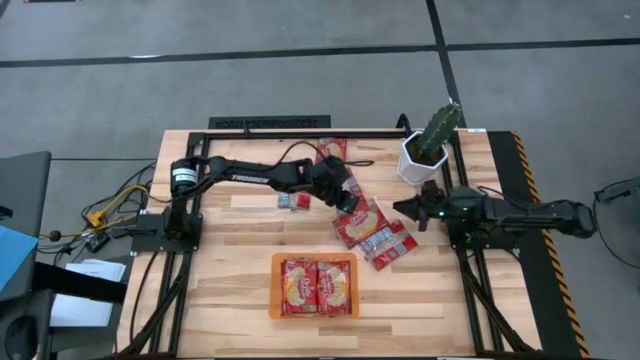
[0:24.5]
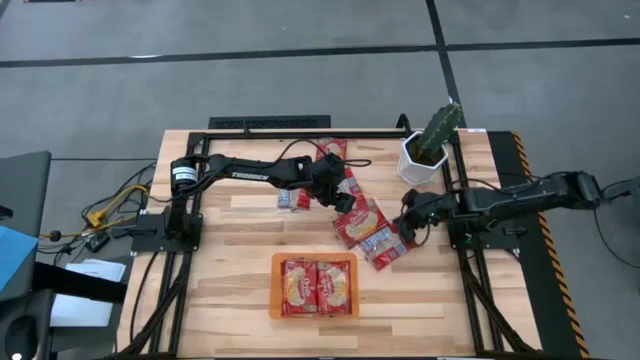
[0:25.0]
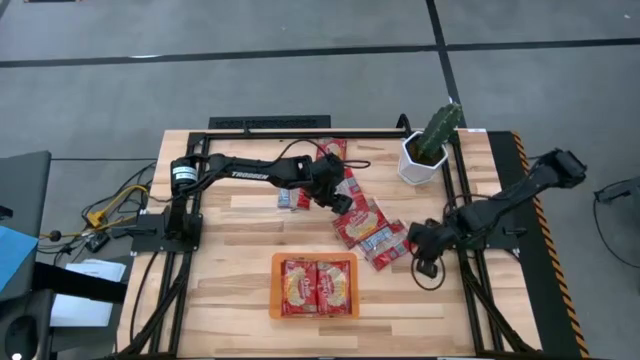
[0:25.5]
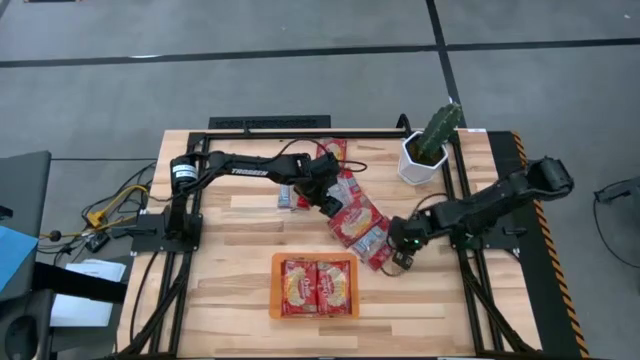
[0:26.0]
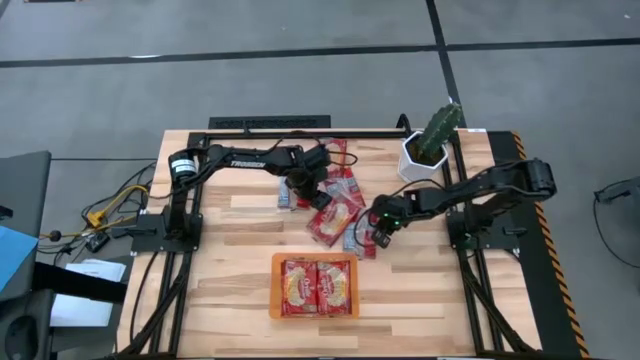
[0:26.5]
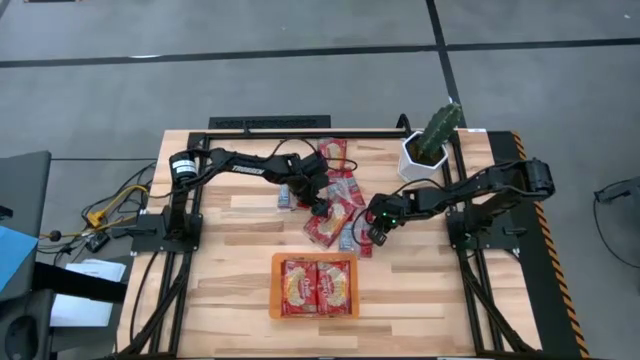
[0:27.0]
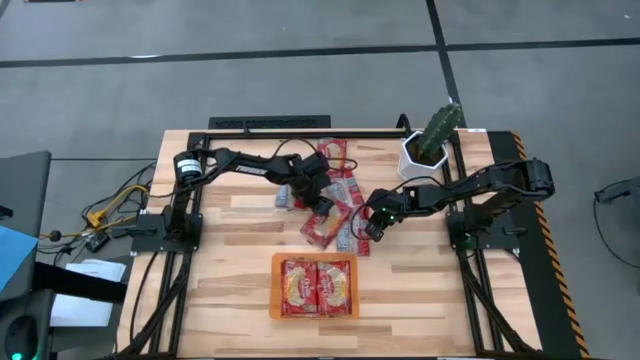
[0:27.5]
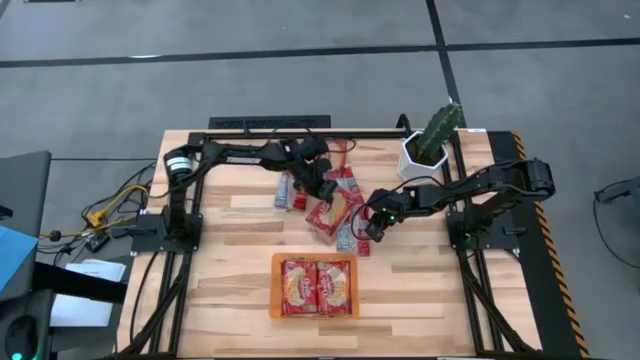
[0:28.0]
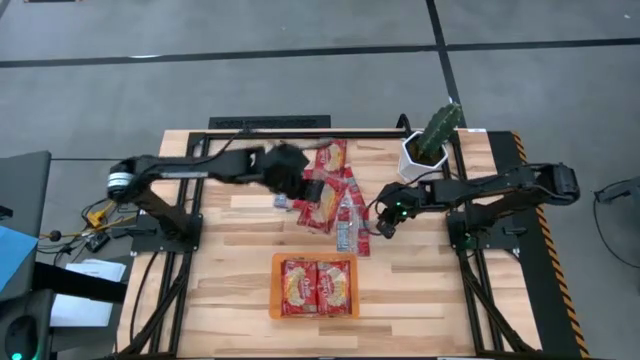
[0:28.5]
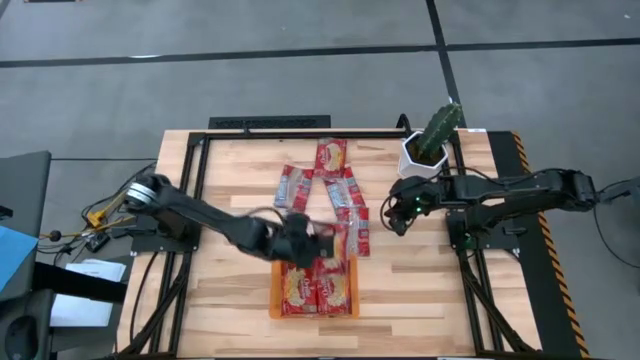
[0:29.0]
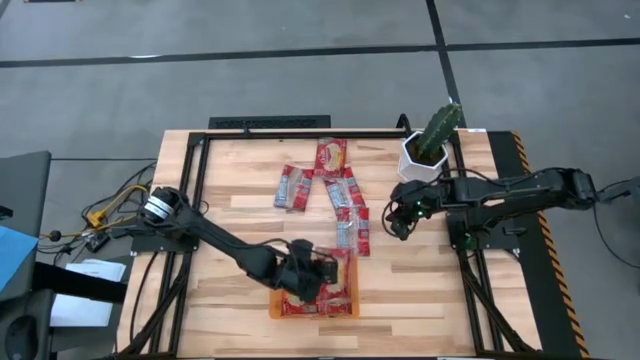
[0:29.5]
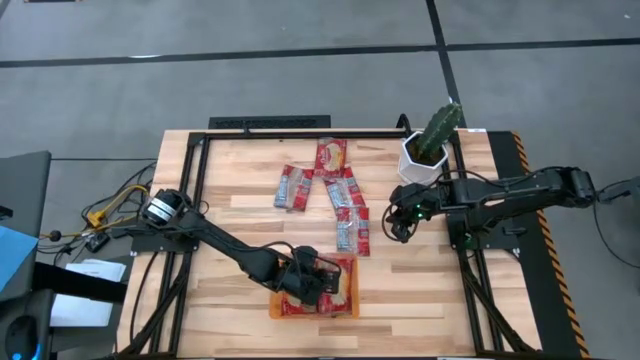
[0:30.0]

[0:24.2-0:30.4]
Task: Sort popcorn bags into baskets
Put the red popcorn bag into the orange bin

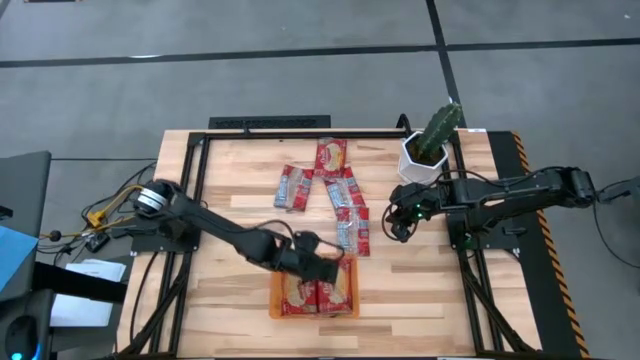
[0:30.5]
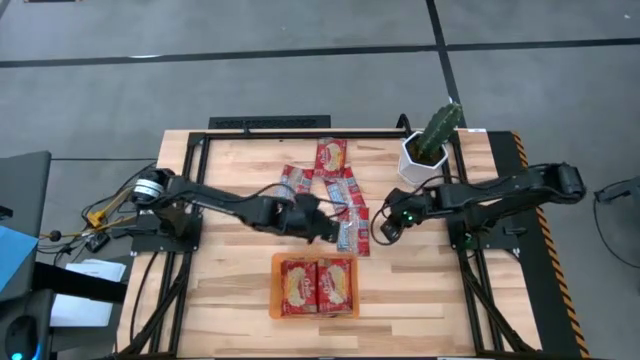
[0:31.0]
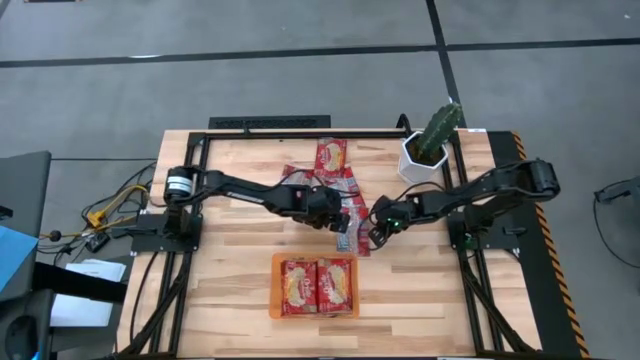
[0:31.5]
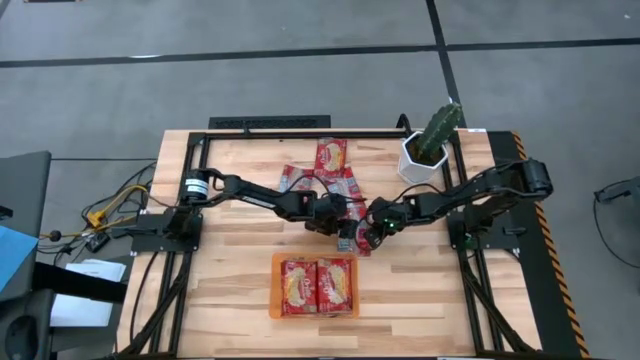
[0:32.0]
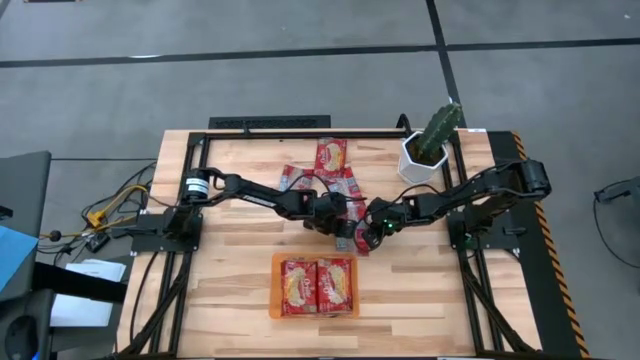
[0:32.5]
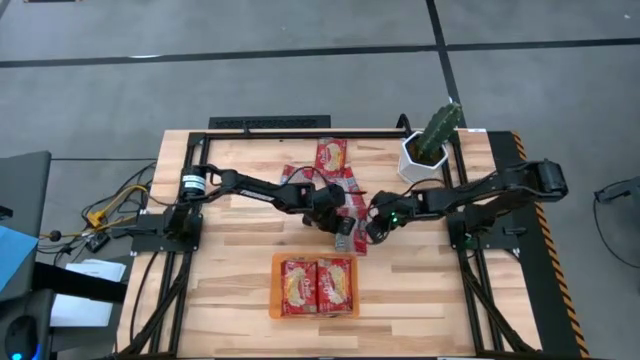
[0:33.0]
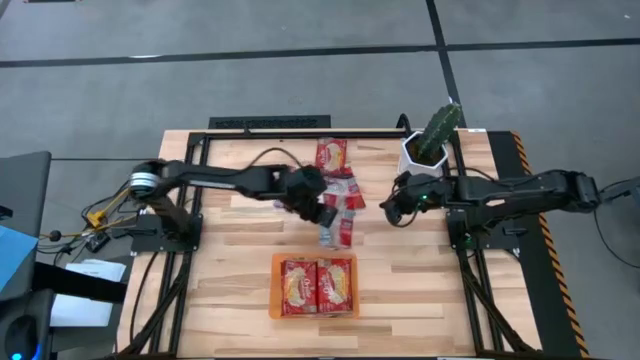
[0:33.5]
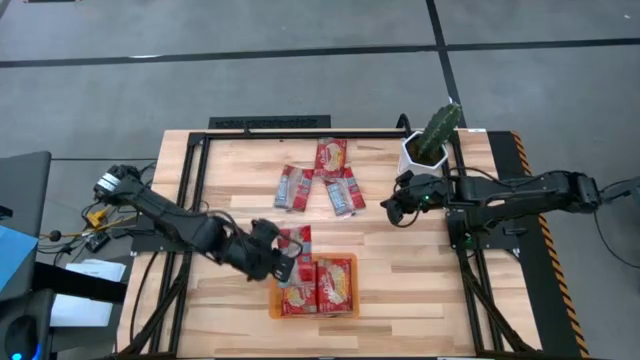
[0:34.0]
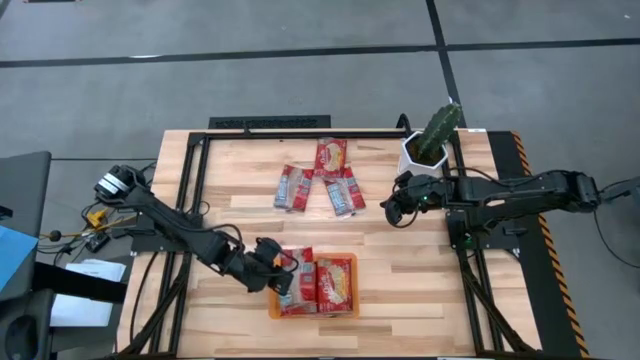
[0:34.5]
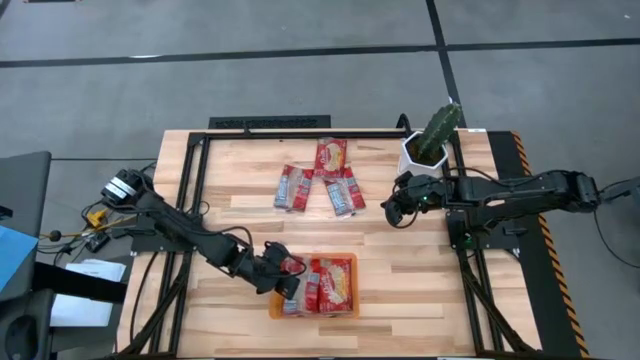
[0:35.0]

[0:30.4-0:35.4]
Put the red popcorn bag into the orange bin

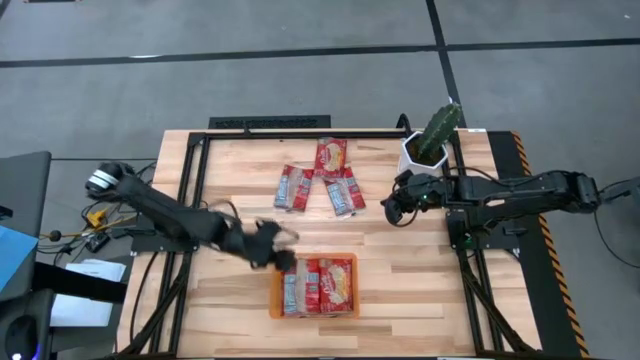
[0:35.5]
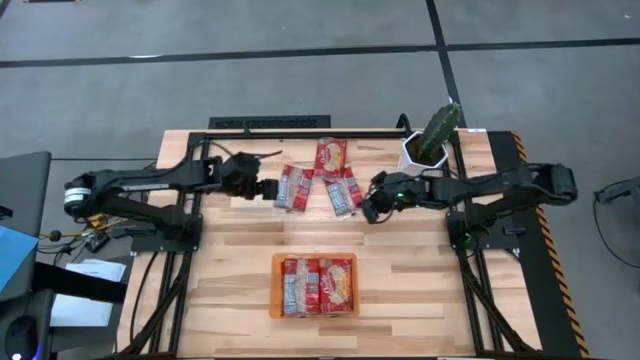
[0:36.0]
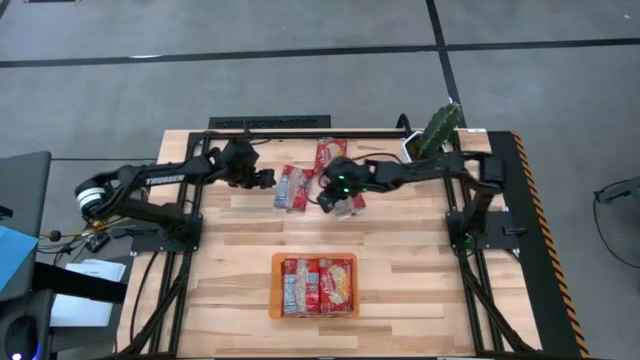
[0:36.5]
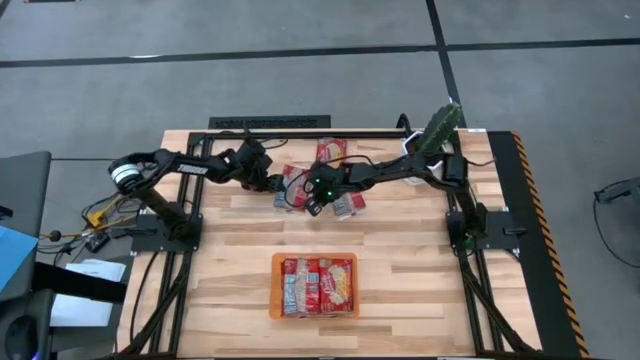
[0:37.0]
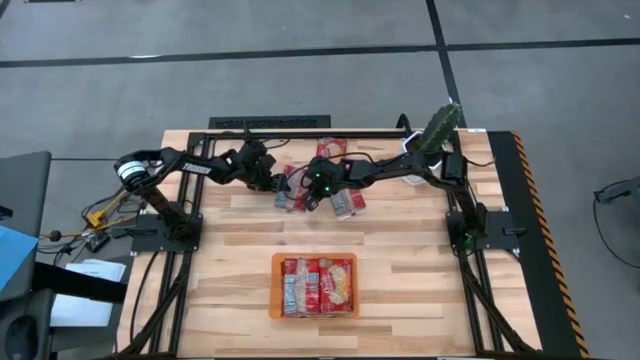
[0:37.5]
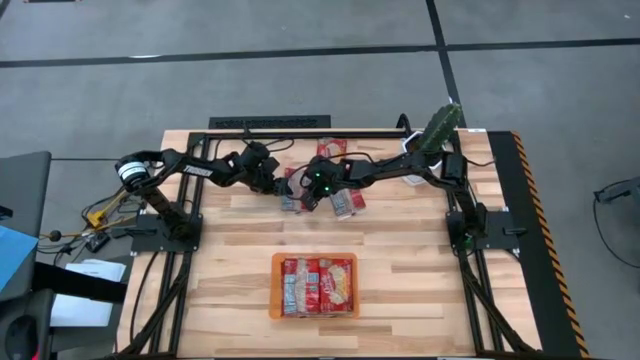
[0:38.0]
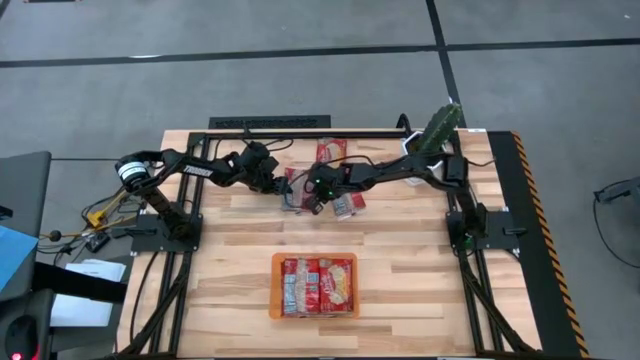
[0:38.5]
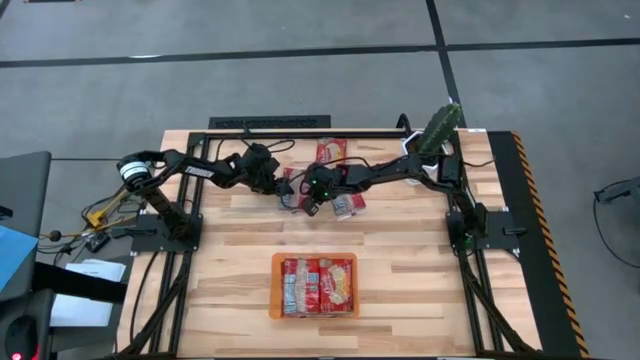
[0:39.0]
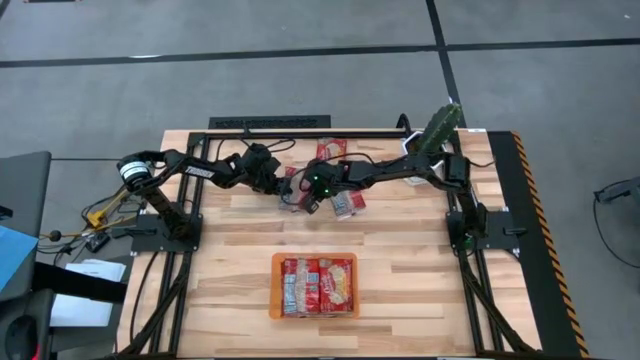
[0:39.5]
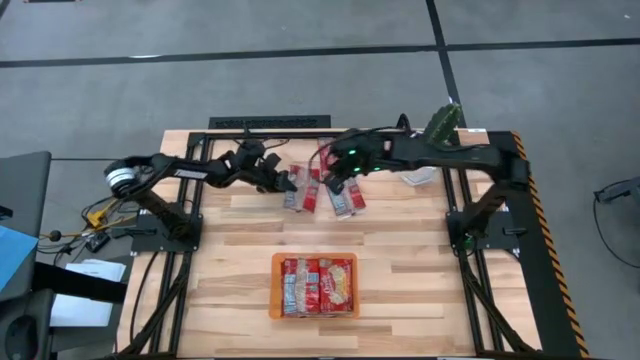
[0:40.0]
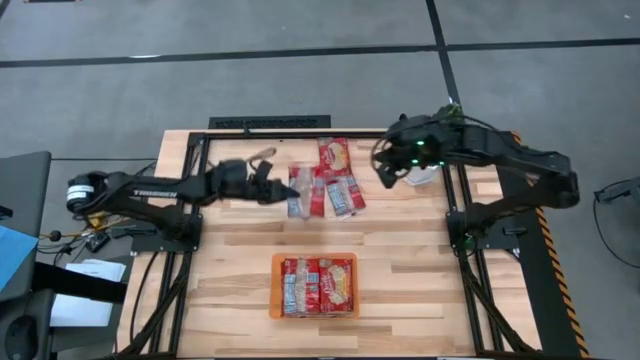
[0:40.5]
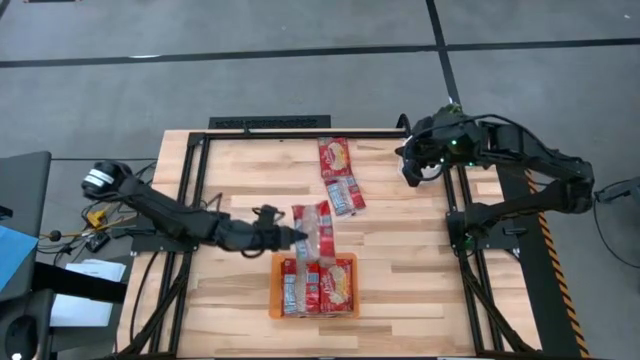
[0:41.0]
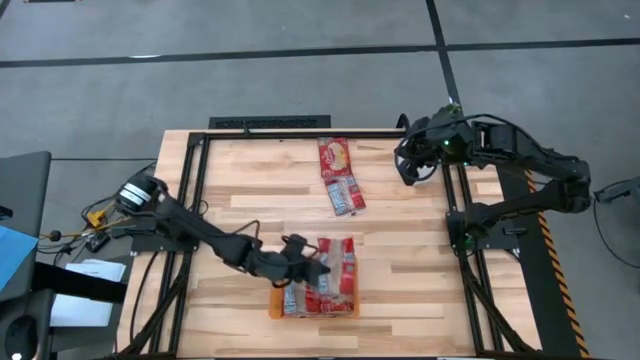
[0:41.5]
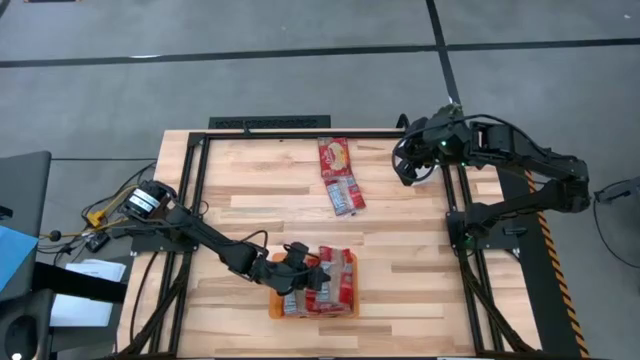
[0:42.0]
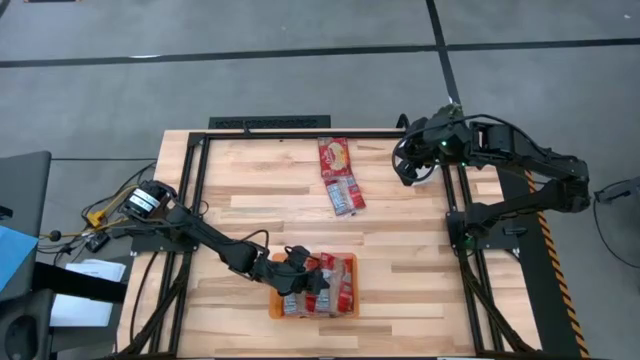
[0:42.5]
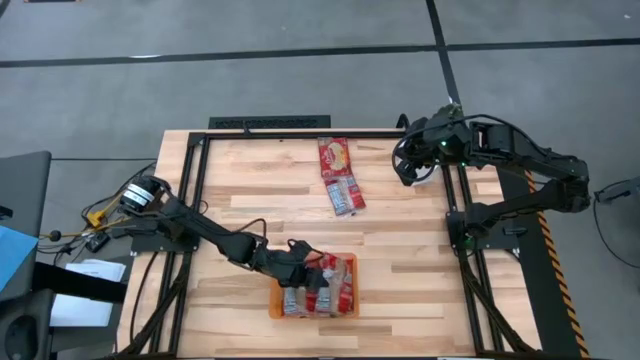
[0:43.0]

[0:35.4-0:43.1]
Put the red popcorn bag into the orange bin

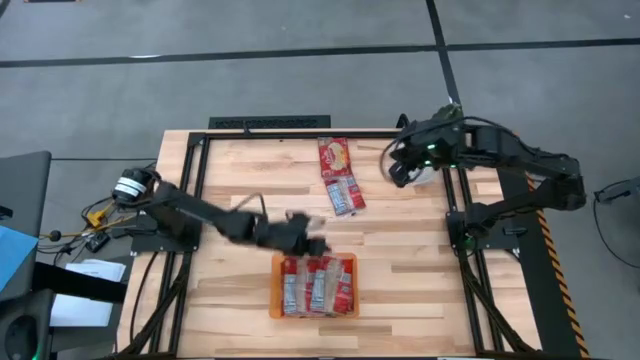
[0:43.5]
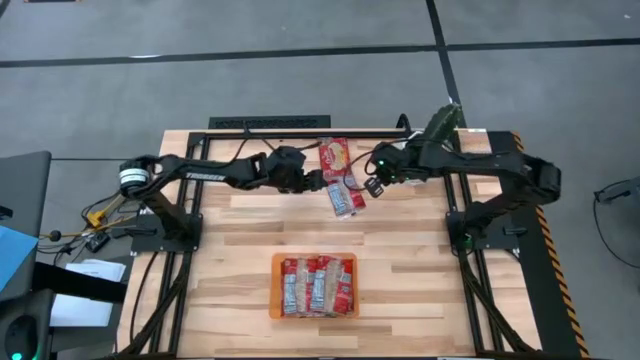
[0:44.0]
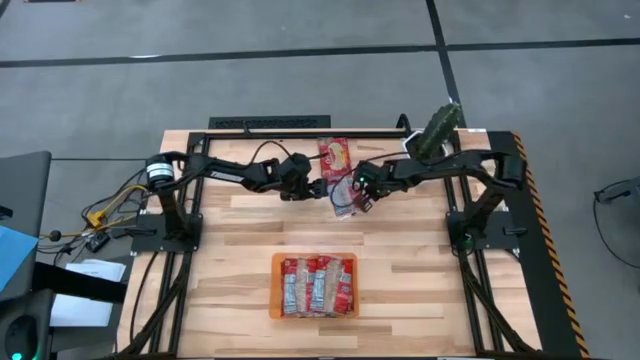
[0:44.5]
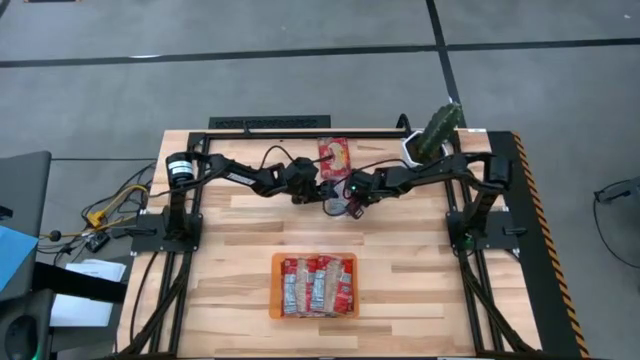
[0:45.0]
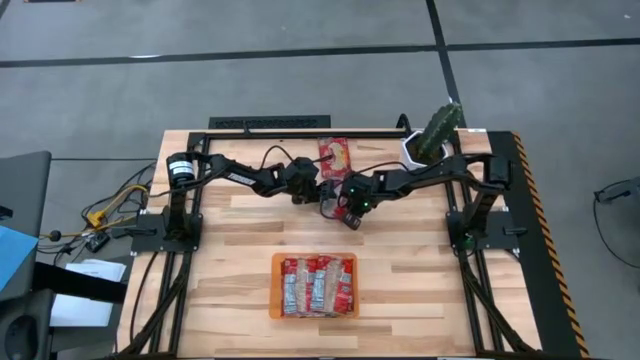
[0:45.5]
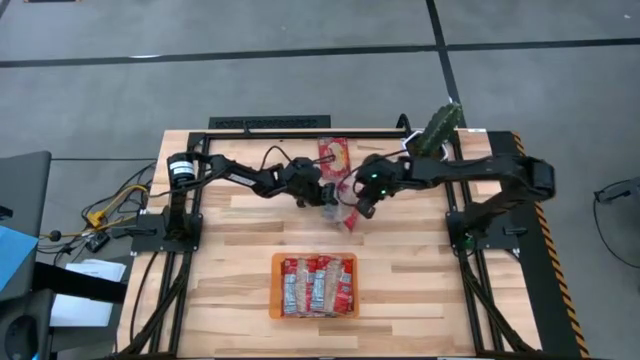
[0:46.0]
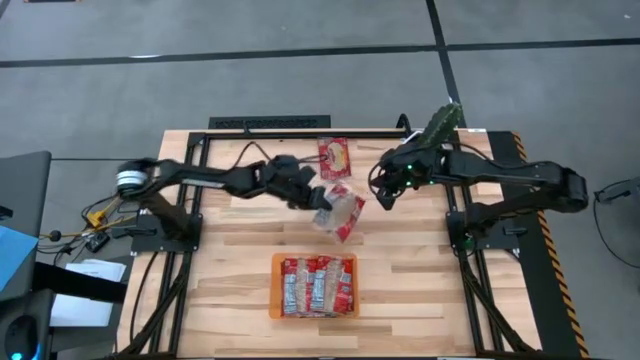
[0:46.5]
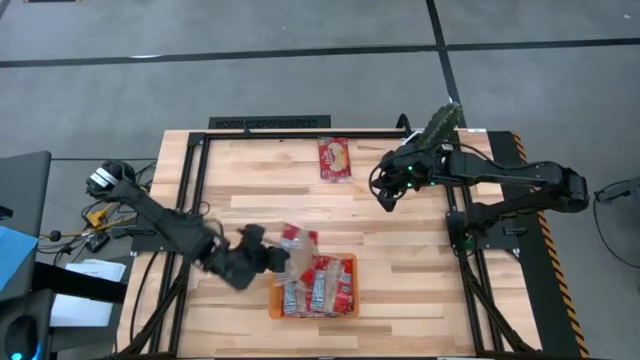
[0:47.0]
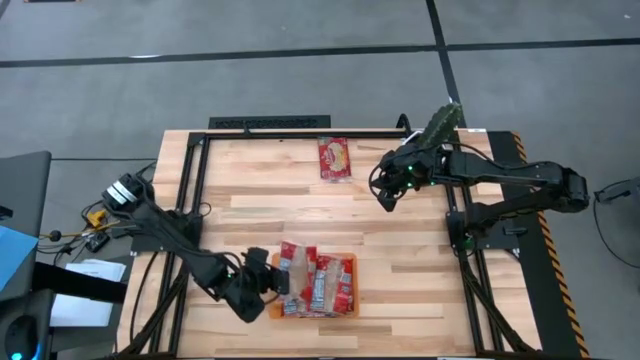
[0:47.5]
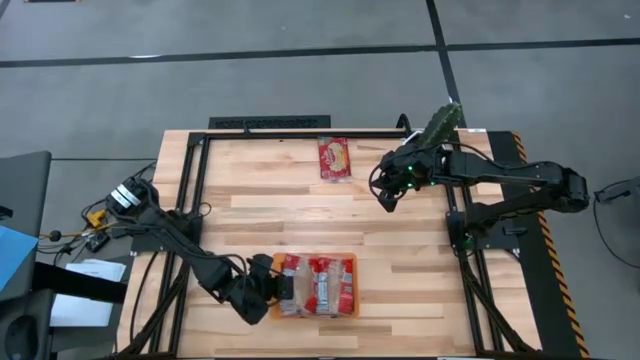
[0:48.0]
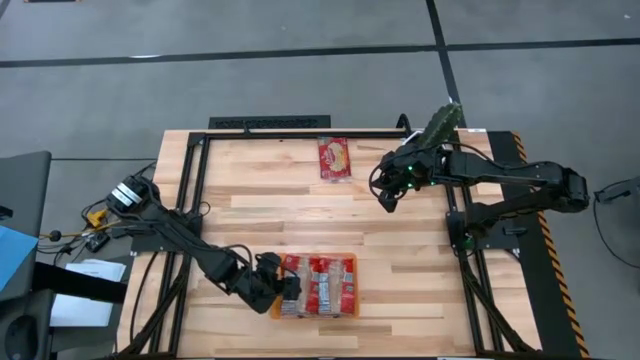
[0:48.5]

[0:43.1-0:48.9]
Put the red popcorn bag into the orange bin
